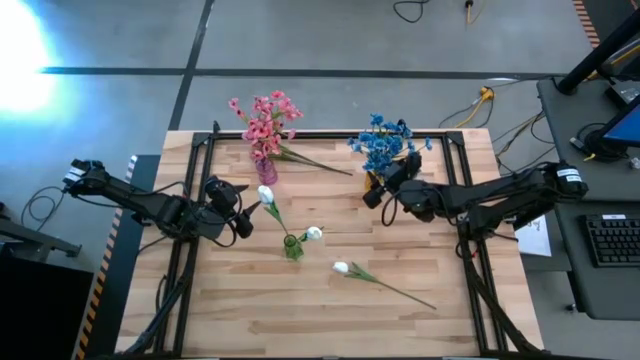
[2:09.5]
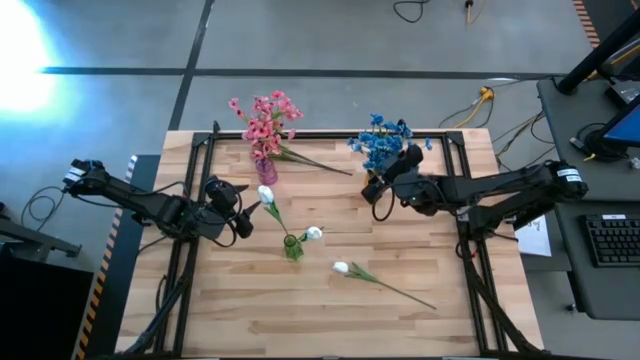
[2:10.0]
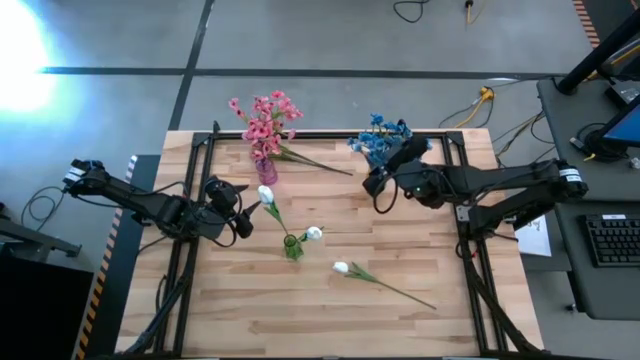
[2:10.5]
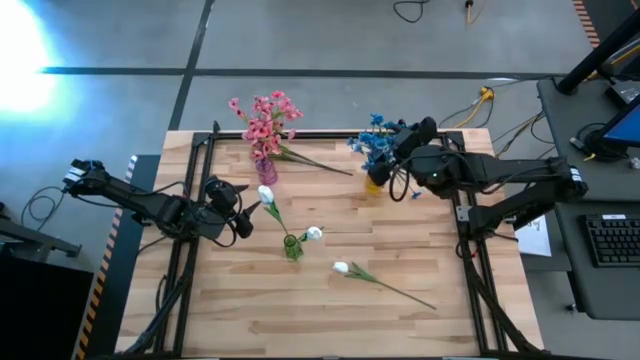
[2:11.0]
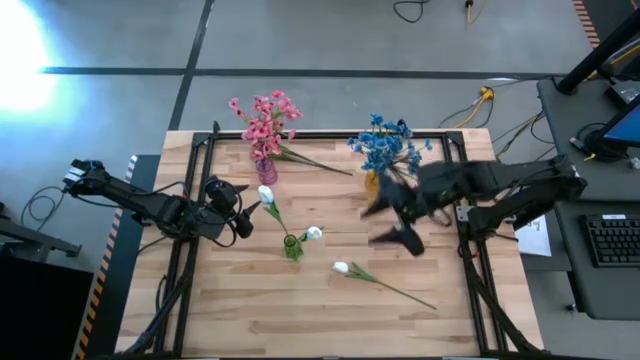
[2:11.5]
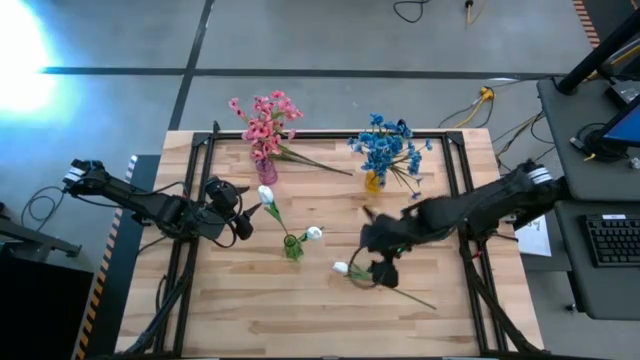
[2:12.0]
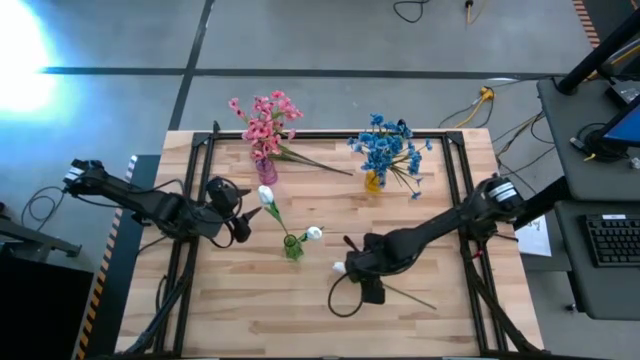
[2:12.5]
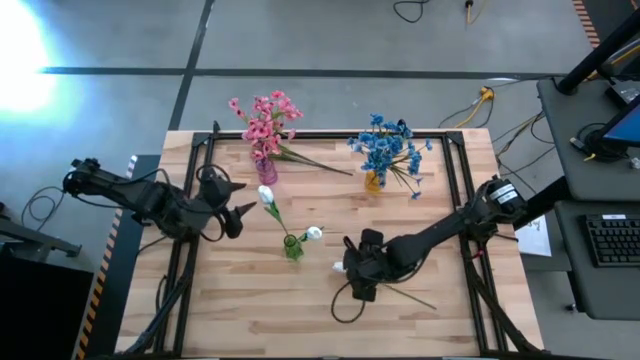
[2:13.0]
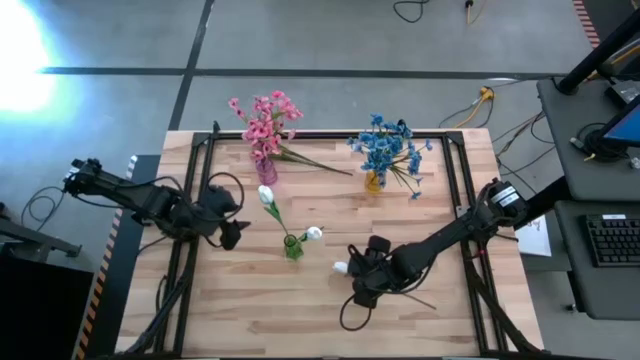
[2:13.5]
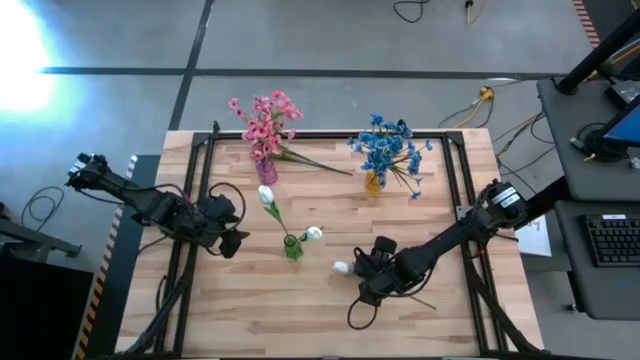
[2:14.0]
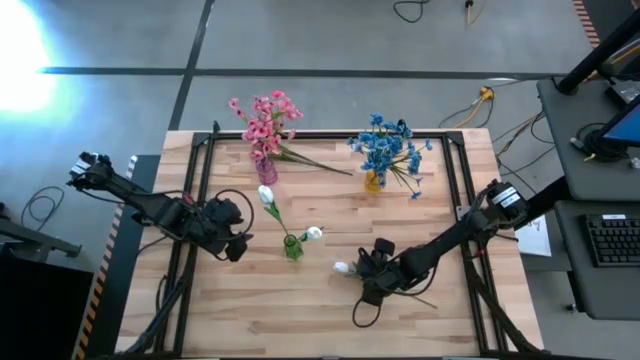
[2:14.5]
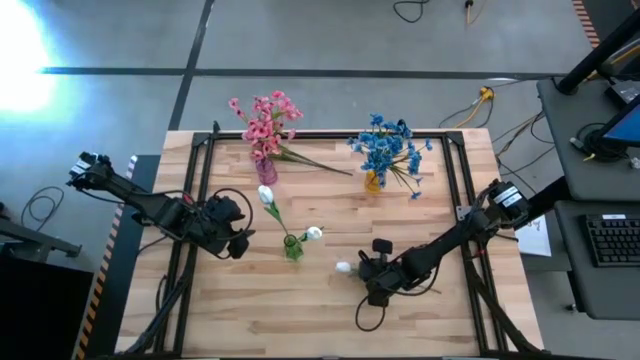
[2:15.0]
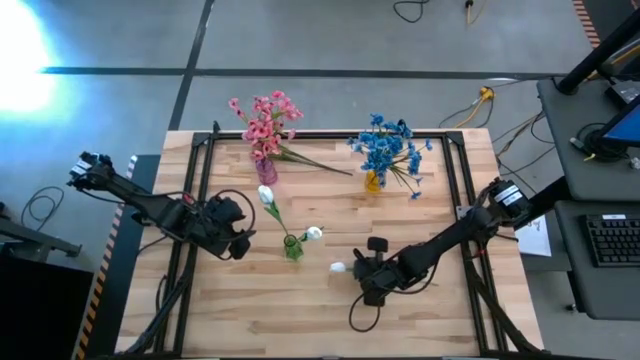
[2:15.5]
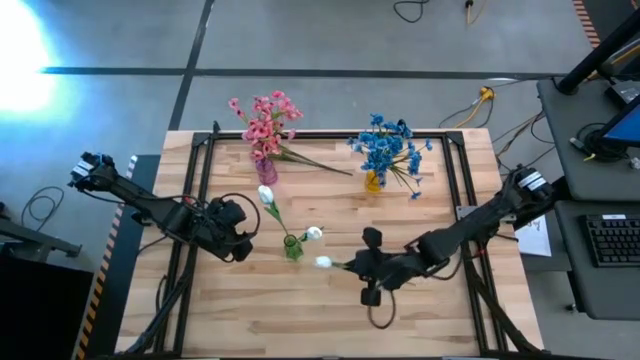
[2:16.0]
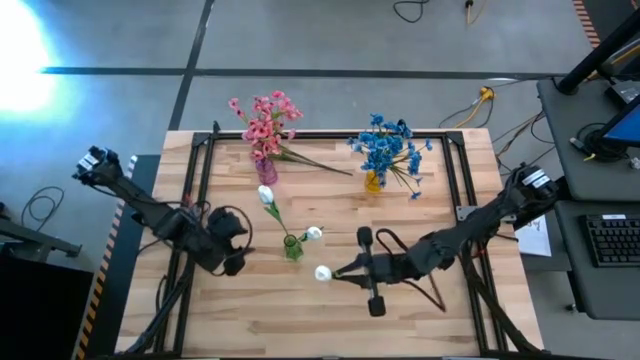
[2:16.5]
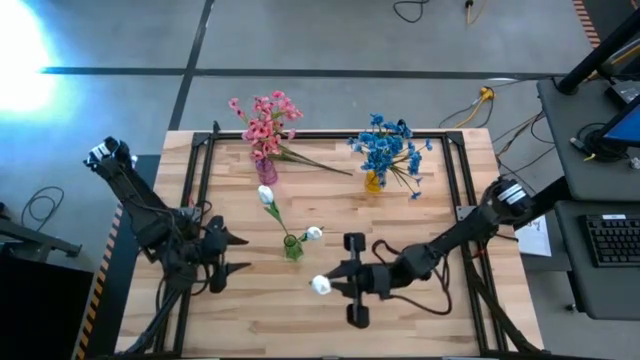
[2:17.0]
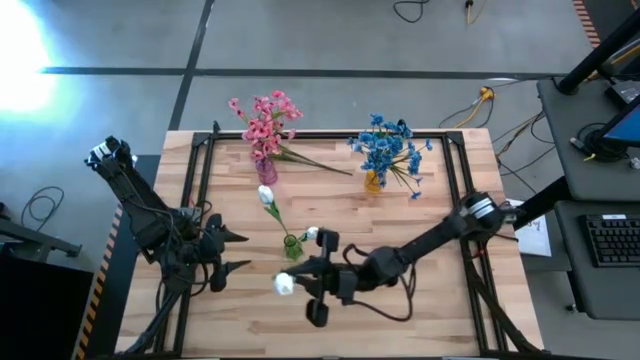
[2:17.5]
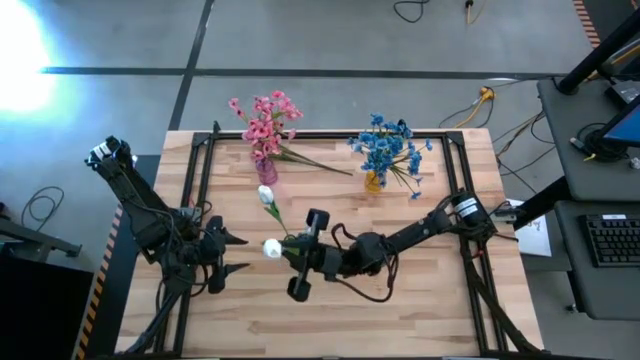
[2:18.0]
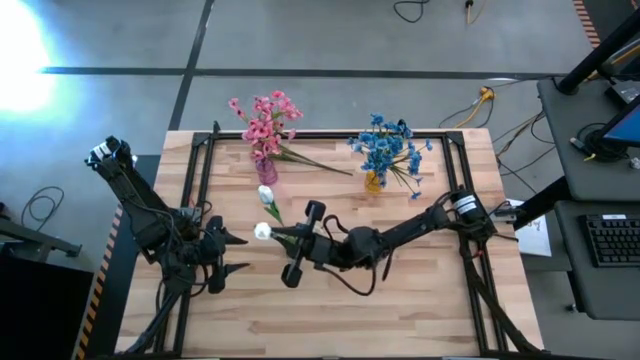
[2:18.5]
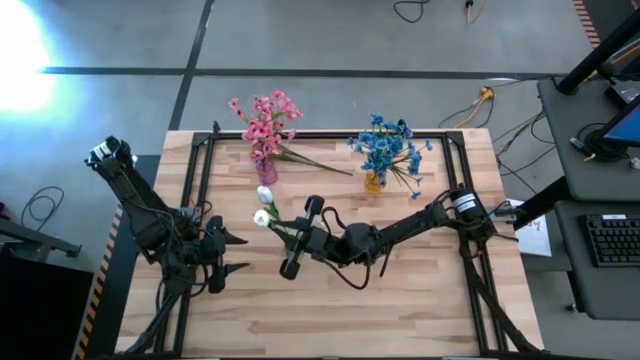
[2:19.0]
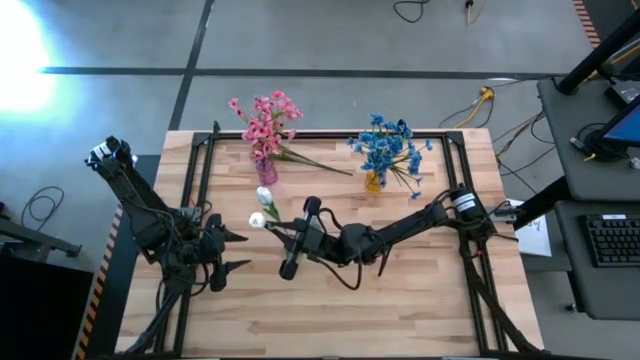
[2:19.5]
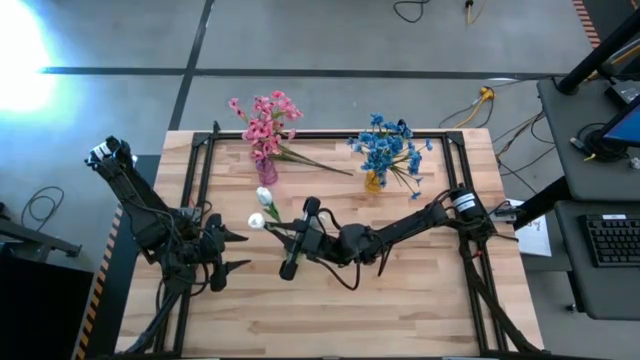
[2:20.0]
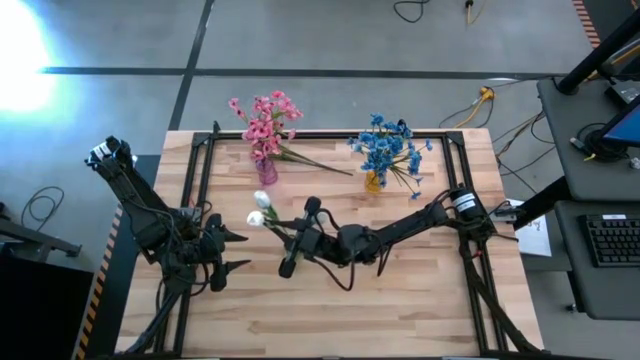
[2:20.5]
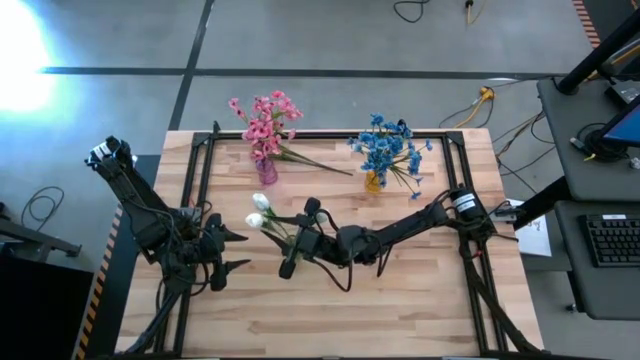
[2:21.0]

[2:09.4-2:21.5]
Task: Sort flowers into vase by color
Put the white flower into the green vase

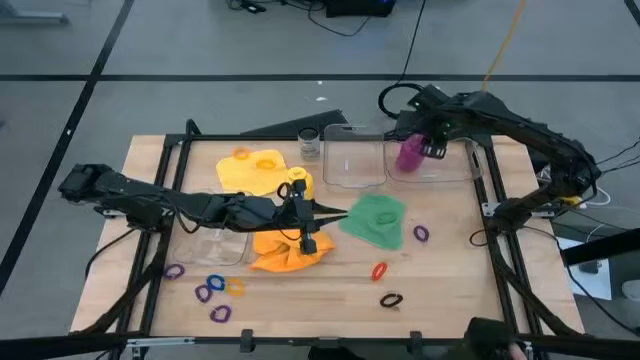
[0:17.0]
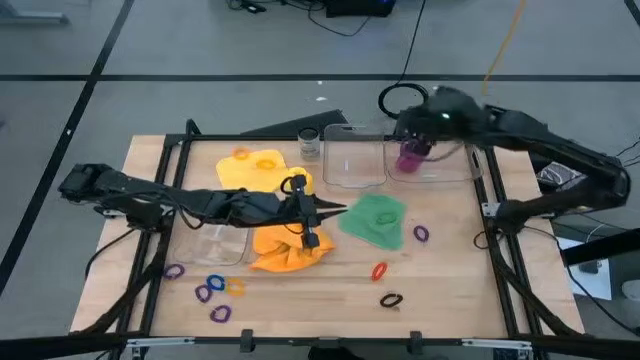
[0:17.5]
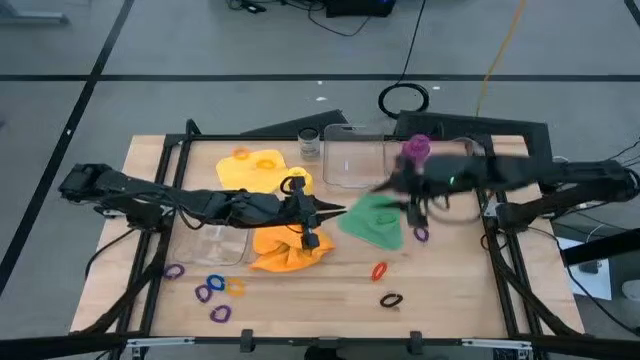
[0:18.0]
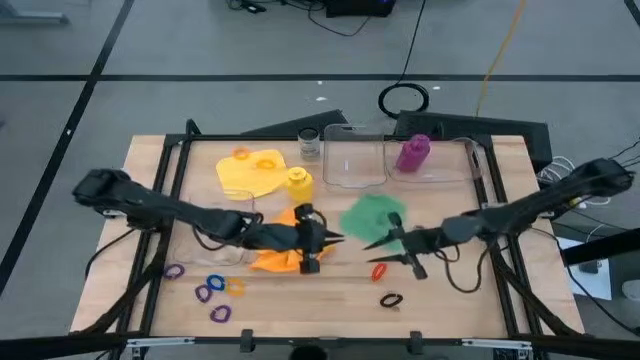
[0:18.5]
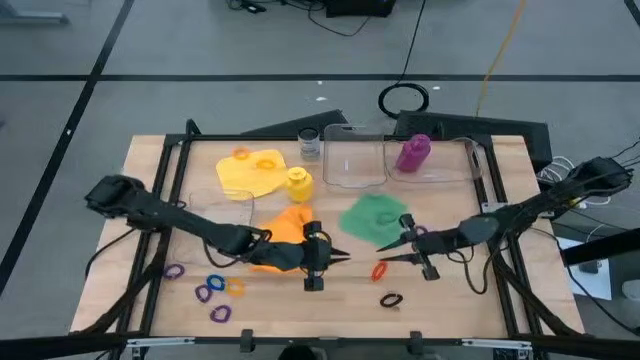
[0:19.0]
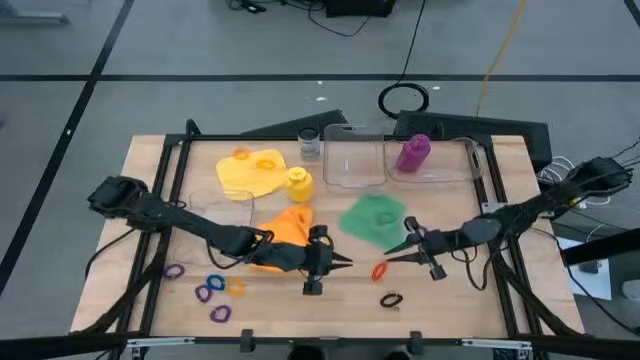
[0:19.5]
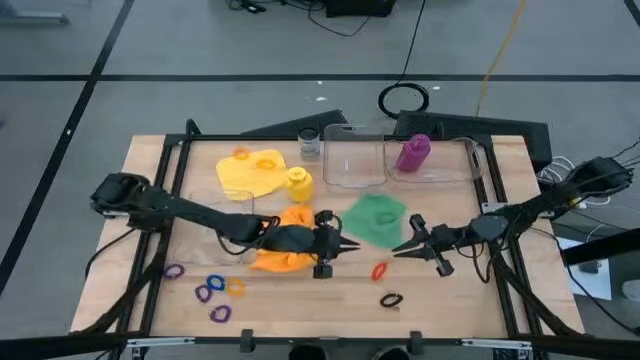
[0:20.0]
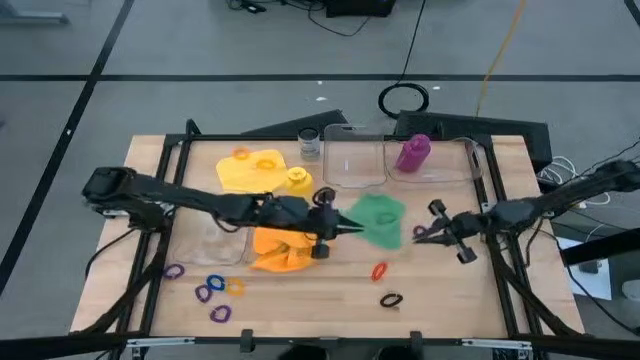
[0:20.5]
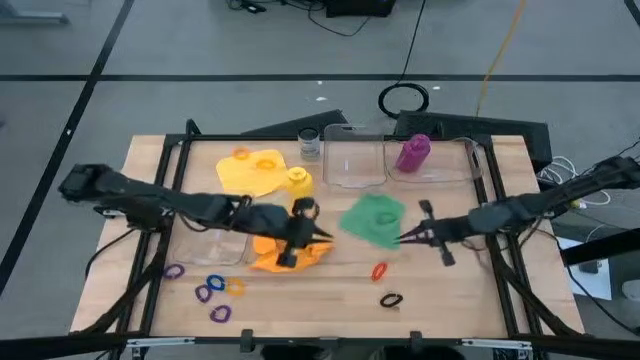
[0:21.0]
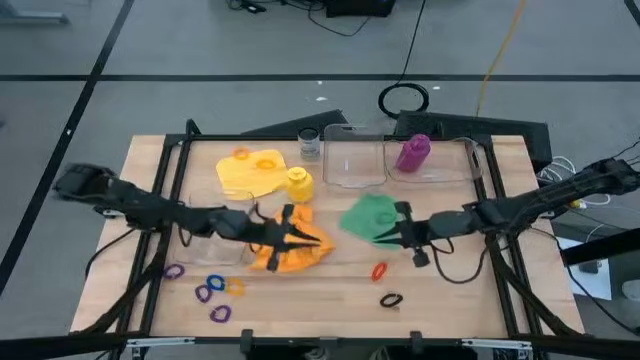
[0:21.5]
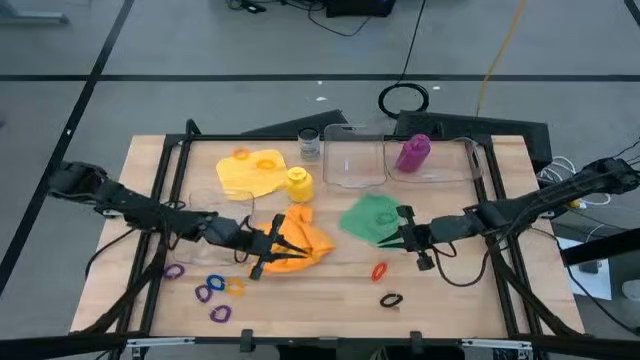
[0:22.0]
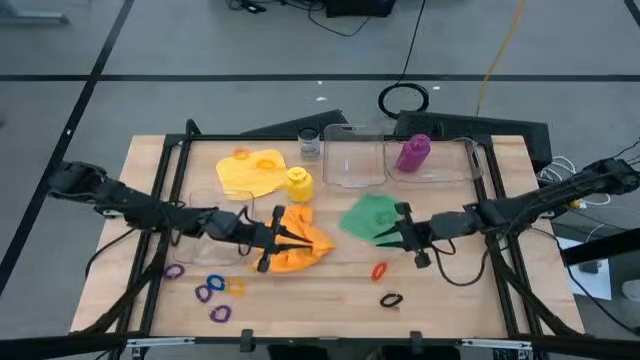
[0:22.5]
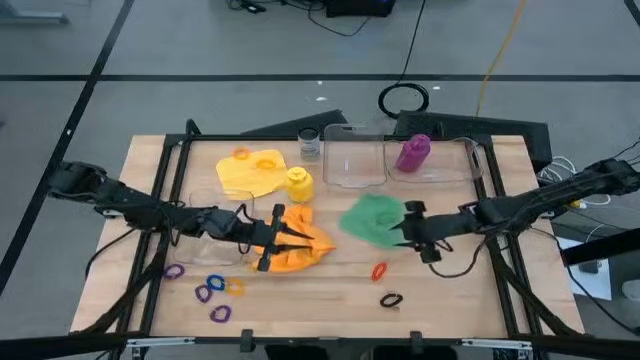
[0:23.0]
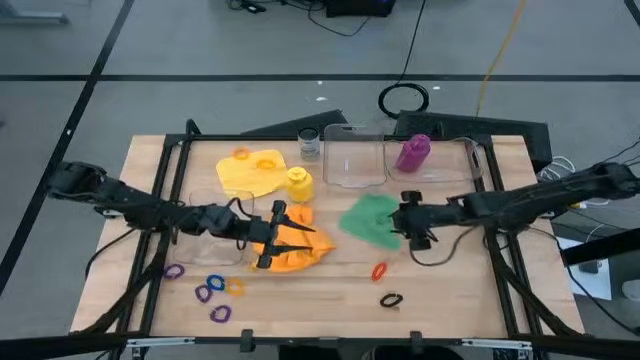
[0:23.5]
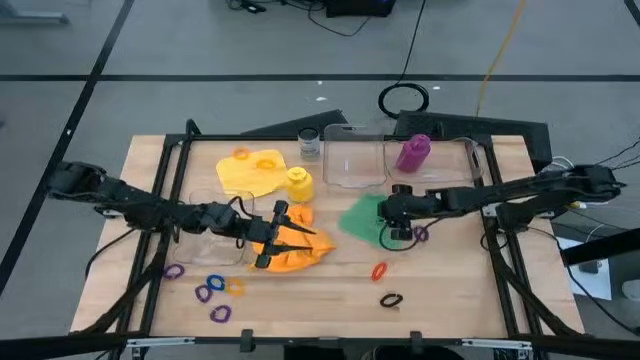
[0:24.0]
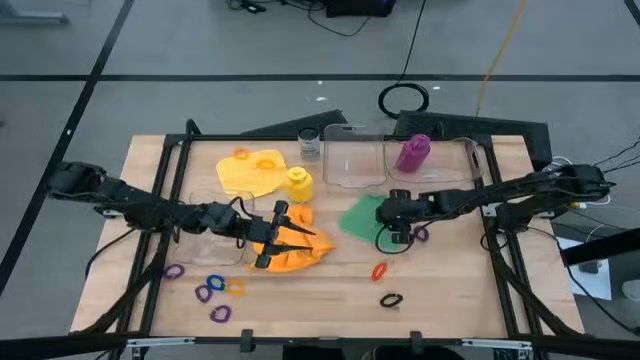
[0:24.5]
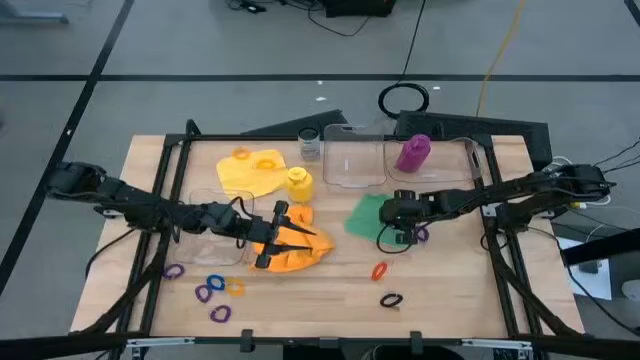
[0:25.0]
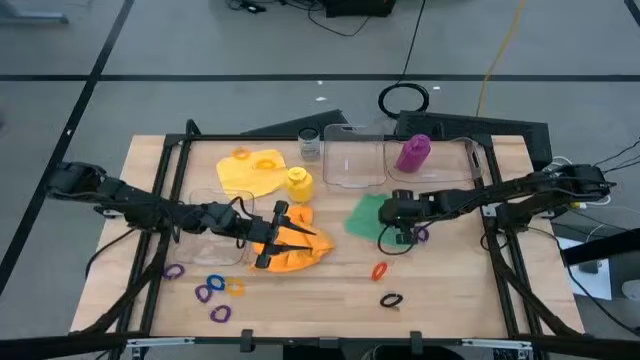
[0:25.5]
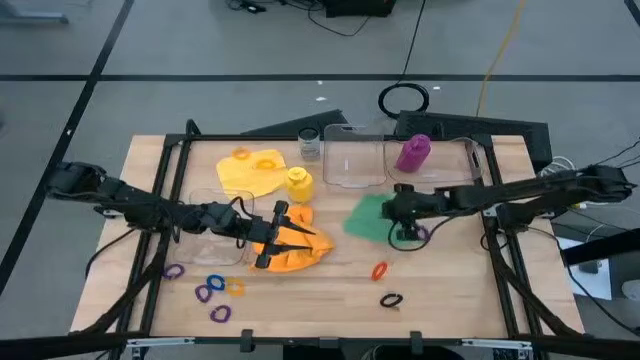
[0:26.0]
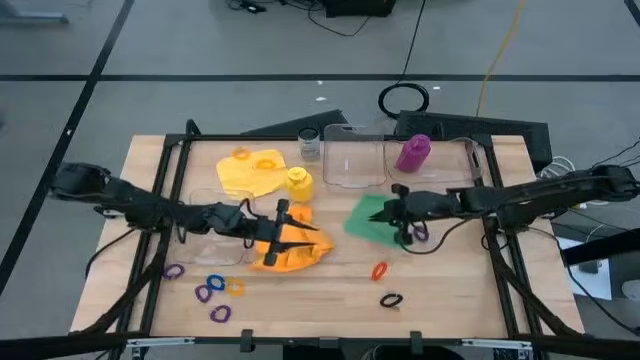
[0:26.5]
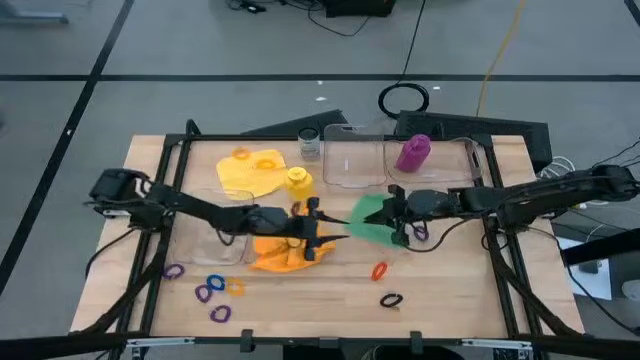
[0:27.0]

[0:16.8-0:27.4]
Task: Pick & Place Sports Items
Put the green spring keychain into the bottom transparent bin
